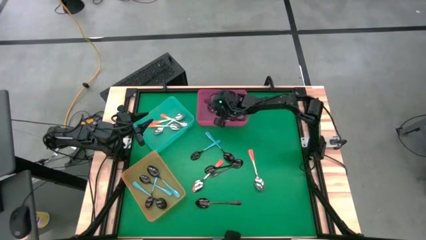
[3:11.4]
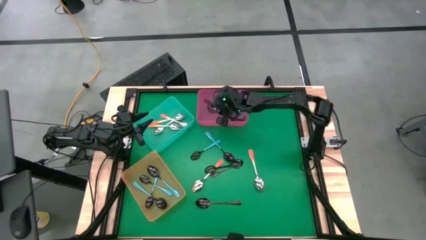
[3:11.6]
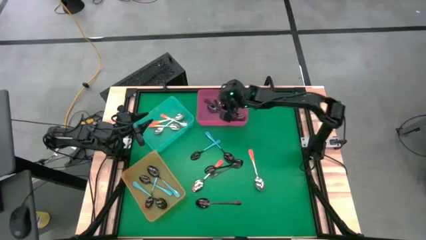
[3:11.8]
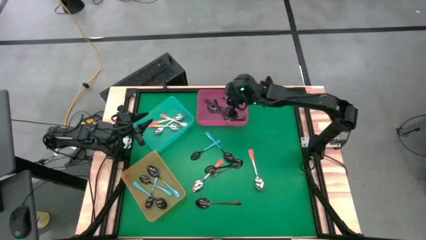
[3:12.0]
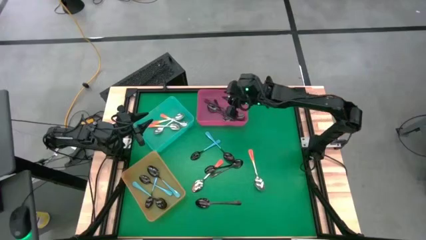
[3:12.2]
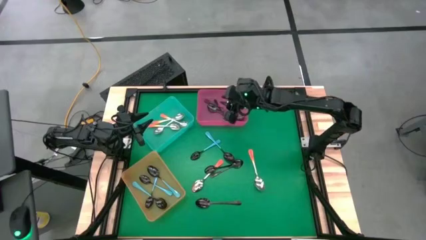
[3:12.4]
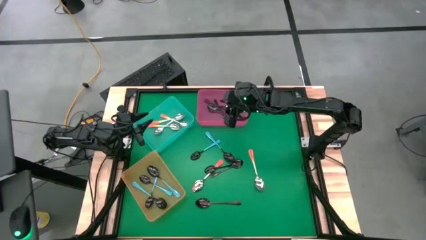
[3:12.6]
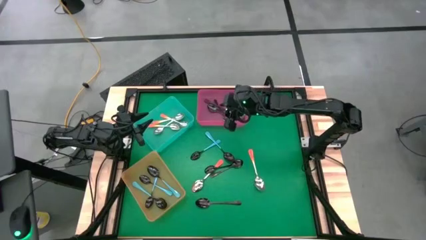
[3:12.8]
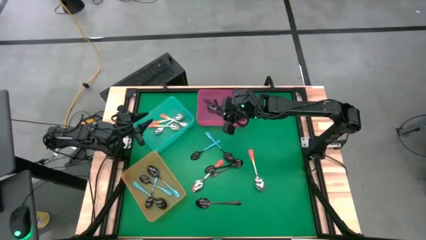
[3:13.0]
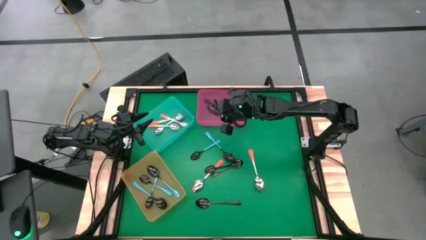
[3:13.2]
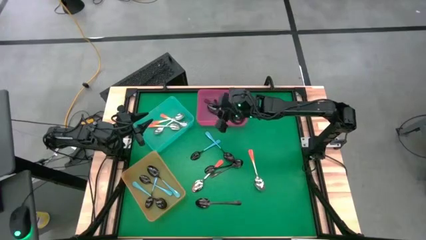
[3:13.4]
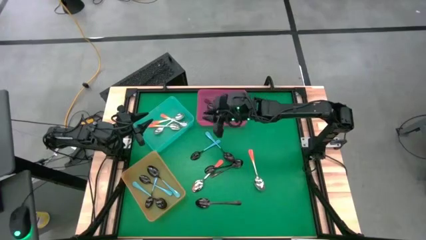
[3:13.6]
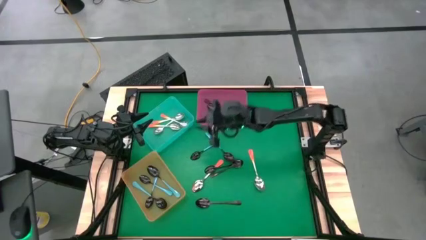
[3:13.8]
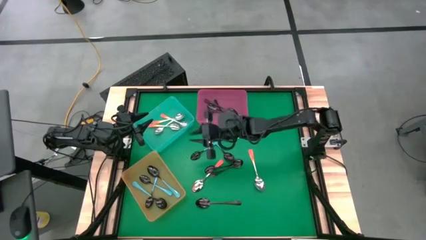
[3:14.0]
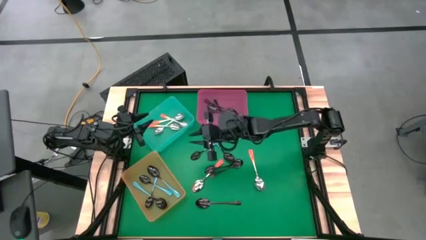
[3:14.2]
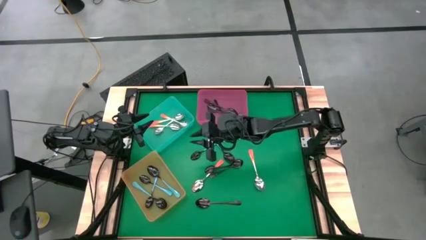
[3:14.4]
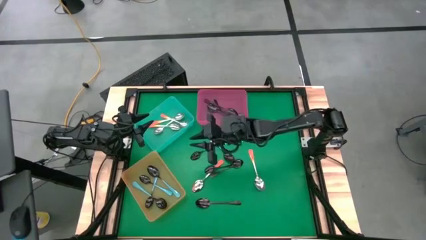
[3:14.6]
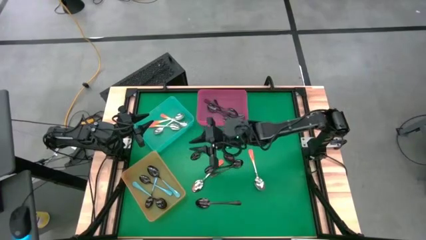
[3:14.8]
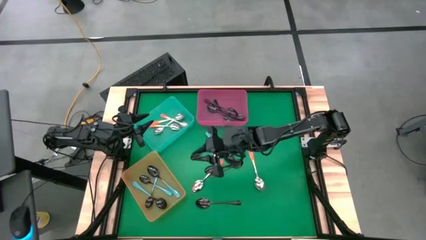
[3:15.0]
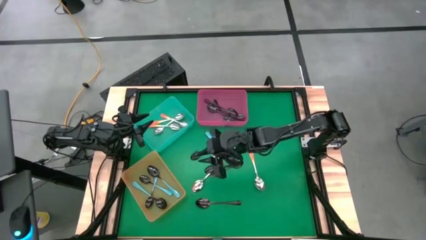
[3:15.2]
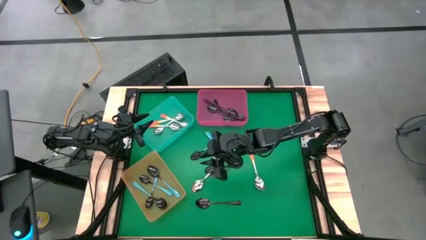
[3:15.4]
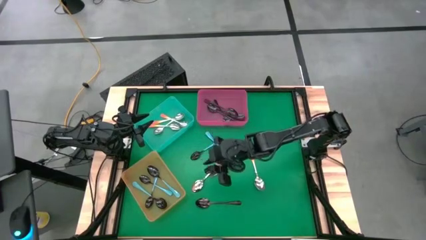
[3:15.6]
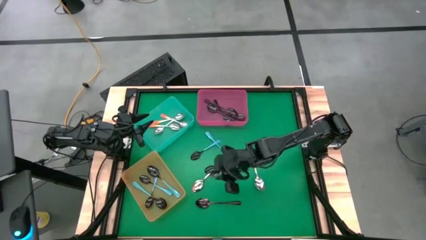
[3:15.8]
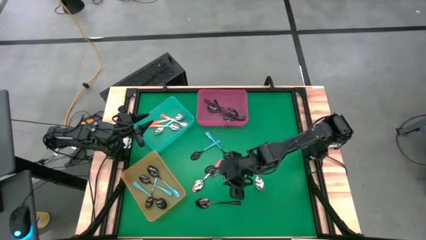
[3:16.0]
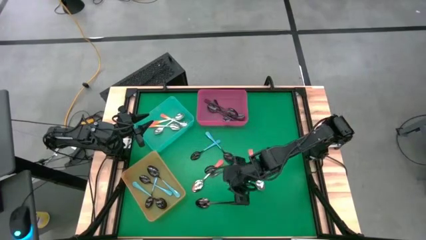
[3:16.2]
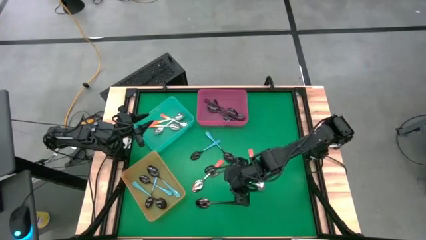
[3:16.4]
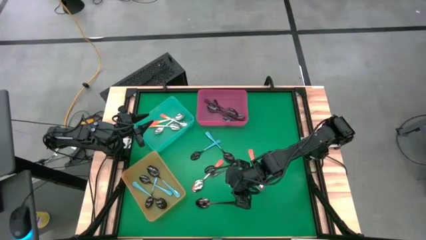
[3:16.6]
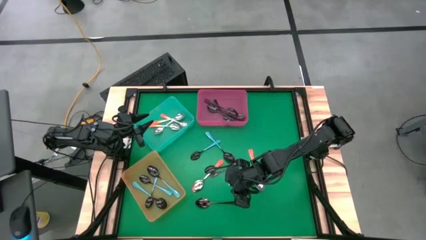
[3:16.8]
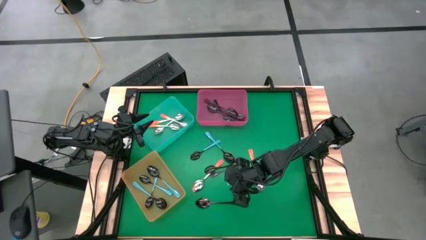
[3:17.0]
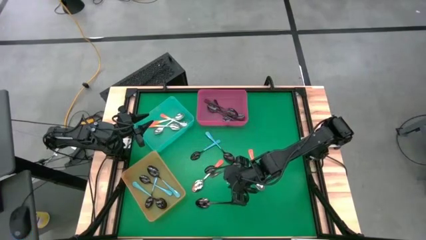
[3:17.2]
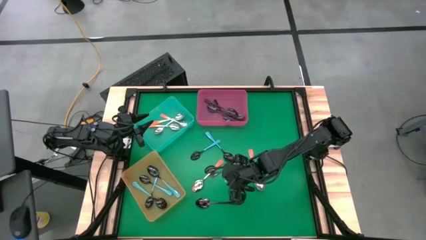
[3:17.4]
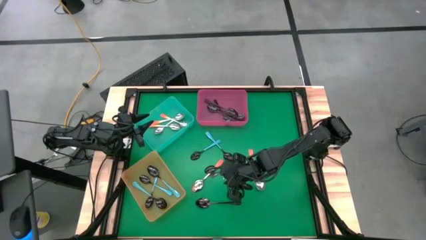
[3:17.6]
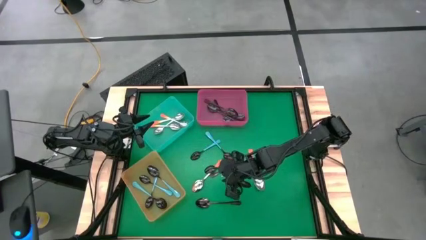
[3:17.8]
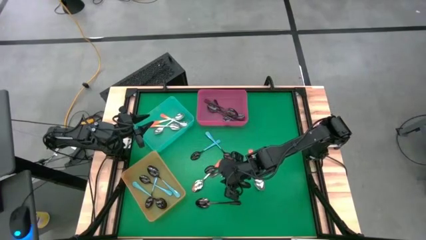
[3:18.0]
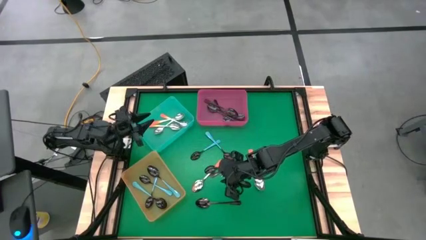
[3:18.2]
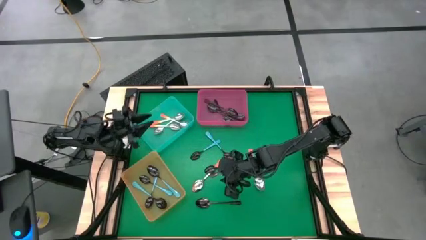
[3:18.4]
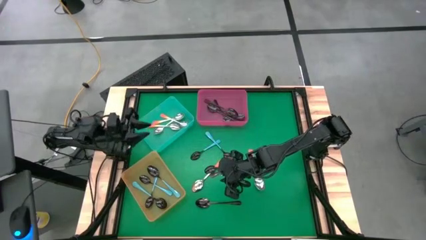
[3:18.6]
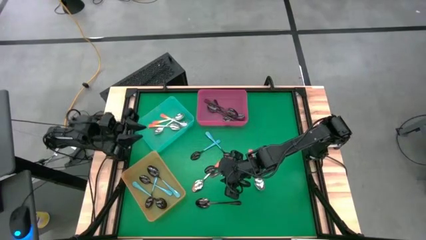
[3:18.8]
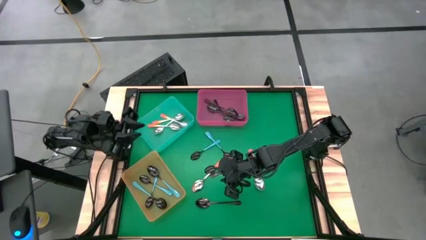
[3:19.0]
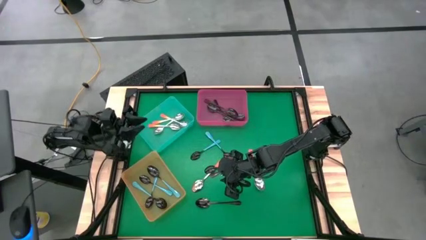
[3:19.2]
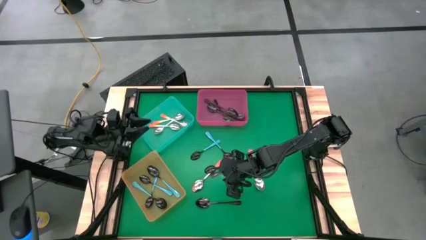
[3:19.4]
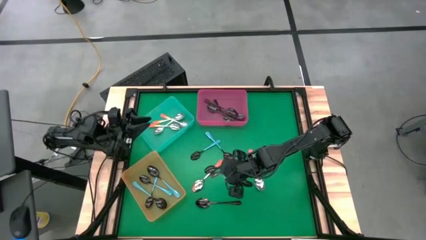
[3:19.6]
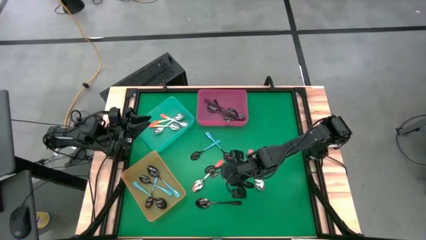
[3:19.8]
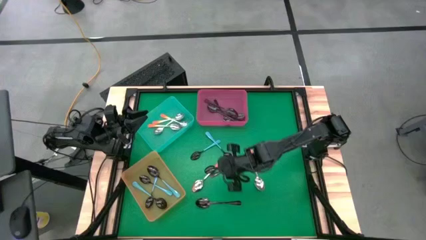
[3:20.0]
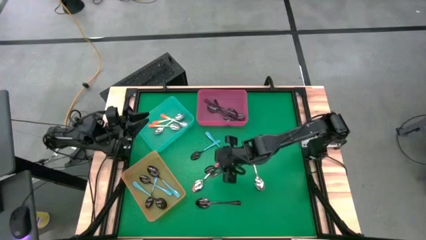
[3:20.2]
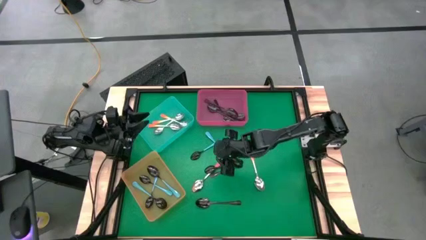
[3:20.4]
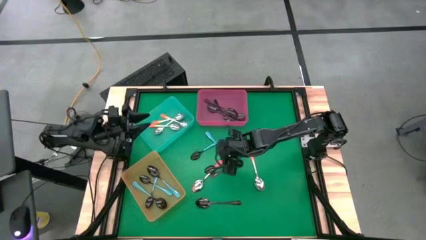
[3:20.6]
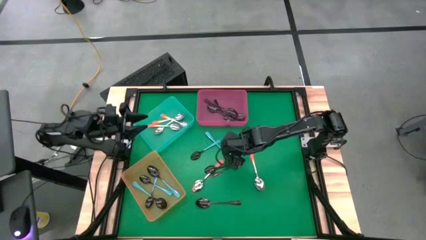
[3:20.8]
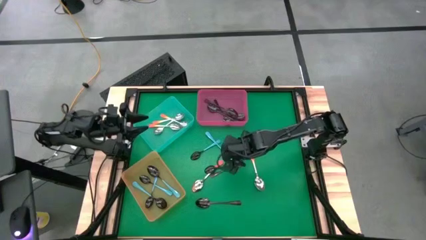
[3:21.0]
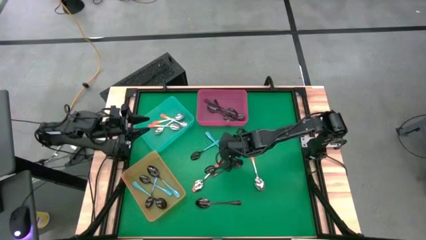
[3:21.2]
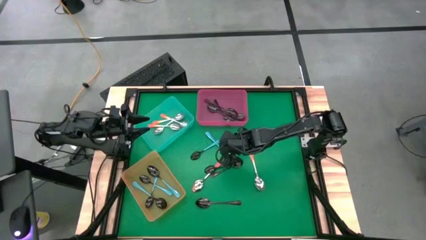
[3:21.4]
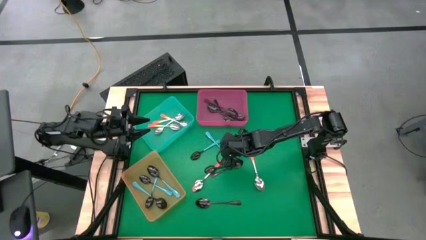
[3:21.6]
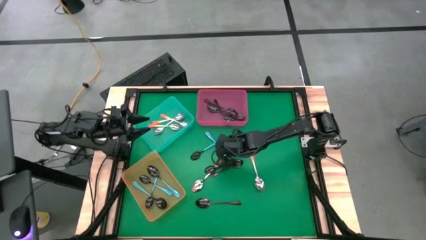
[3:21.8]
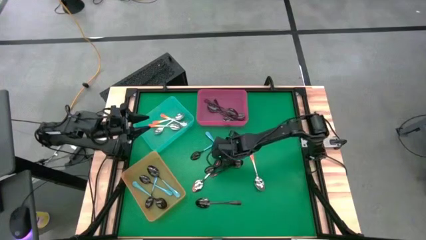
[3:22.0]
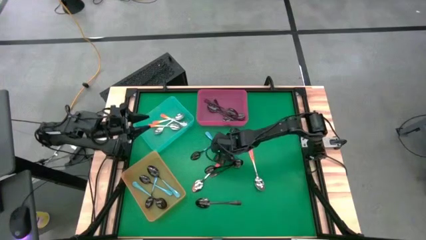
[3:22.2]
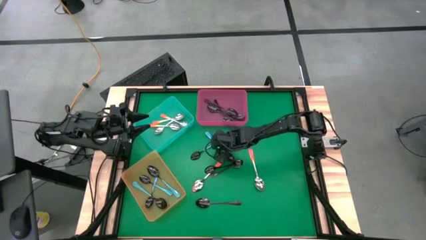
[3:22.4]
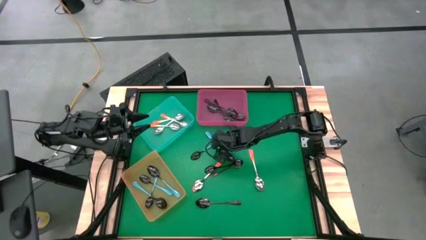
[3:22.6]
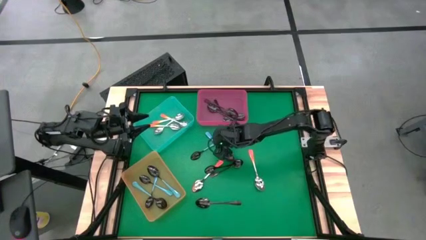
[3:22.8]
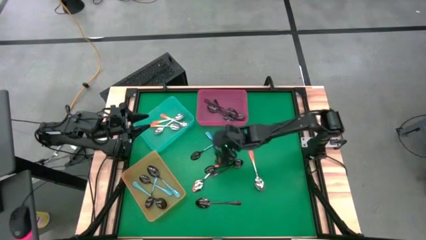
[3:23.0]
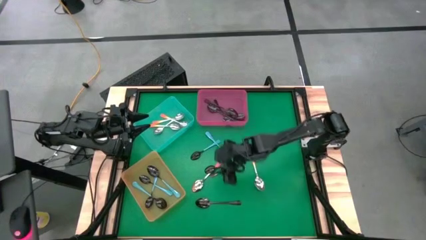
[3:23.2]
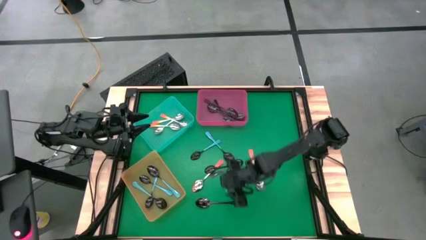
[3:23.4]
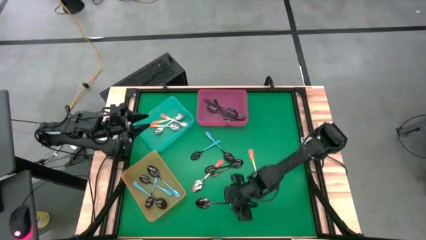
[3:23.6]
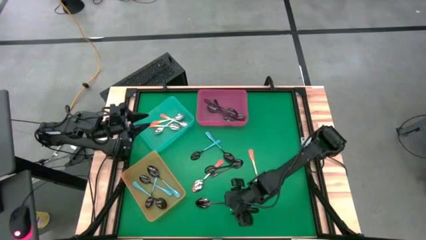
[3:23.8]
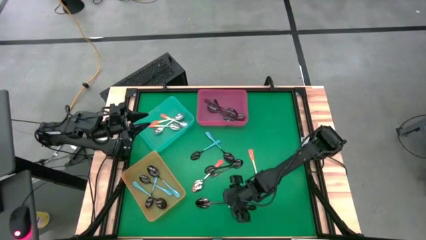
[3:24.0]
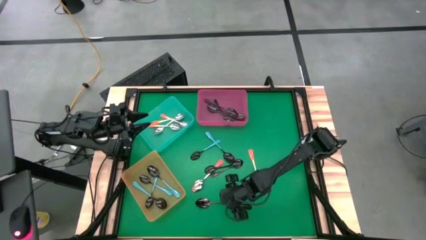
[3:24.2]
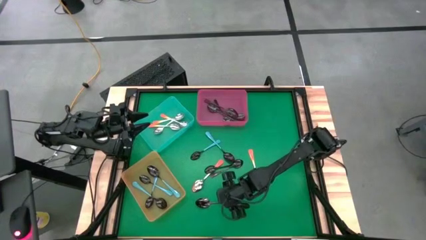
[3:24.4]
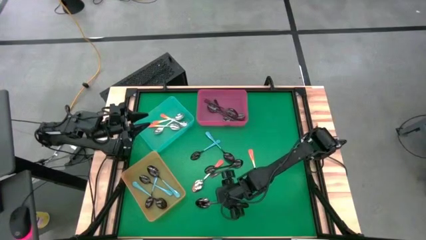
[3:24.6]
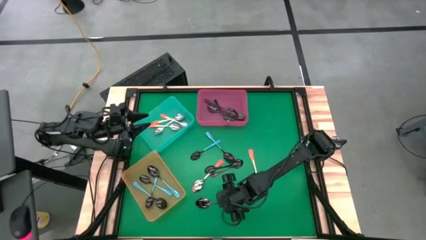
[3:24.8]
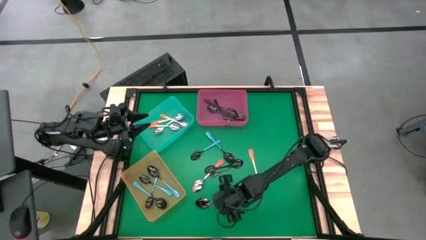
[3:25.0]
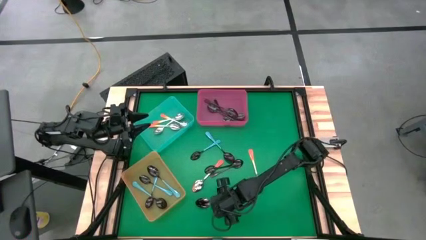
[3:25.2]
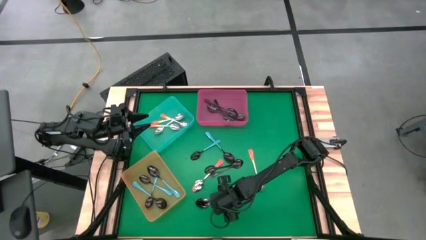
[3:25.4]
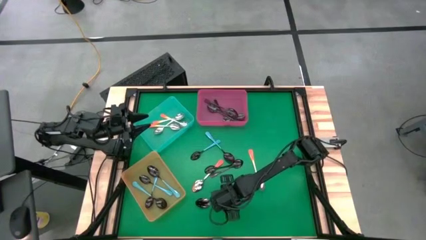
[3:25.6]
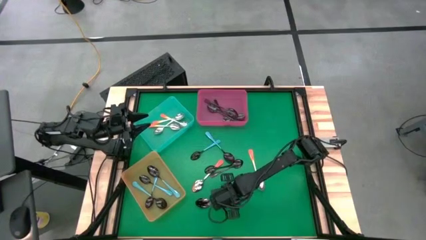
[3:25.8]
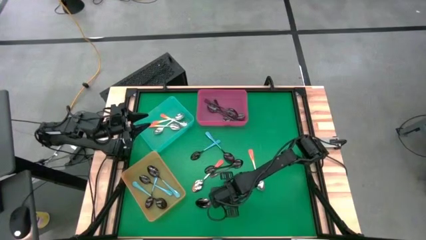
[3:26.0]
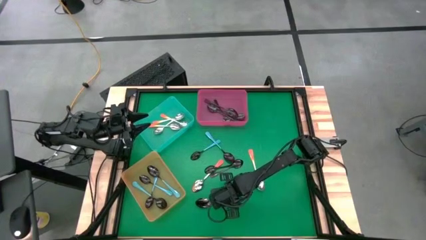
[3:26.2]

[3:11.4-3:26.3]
Task: Sort silverware by color (type)
Put the black spoon into the pink bin

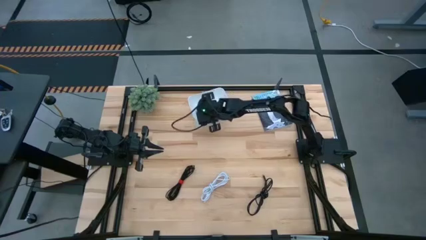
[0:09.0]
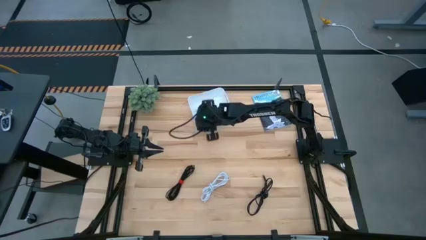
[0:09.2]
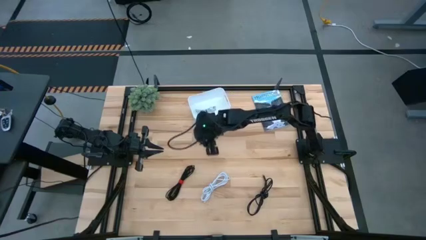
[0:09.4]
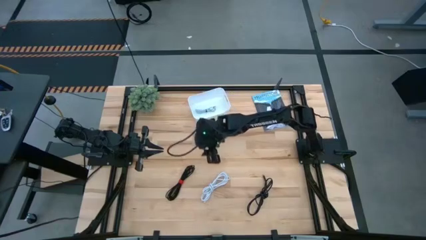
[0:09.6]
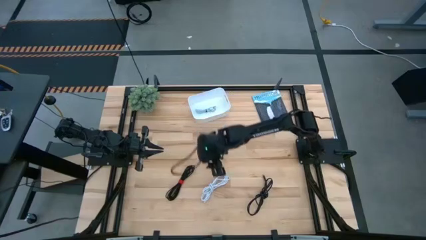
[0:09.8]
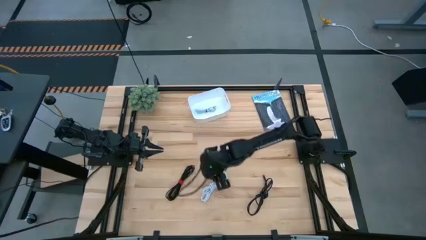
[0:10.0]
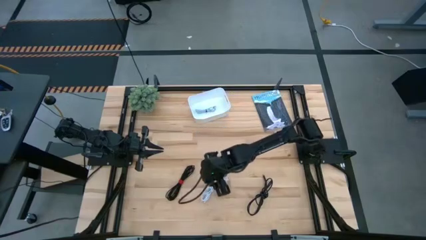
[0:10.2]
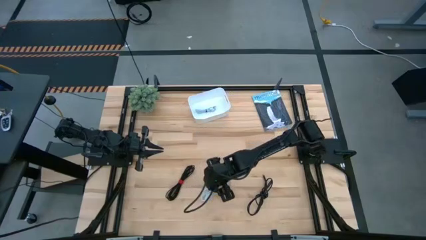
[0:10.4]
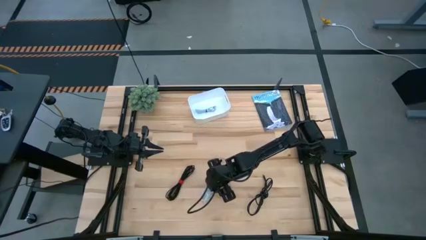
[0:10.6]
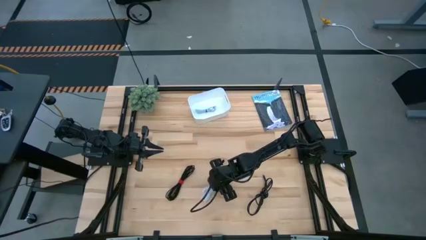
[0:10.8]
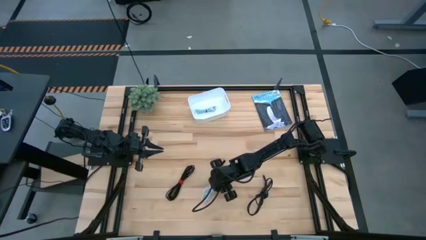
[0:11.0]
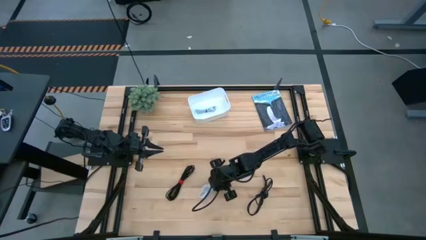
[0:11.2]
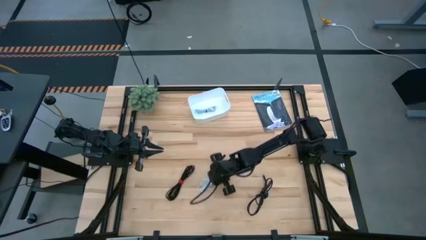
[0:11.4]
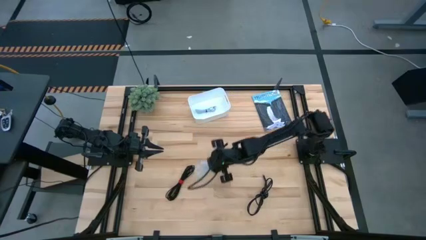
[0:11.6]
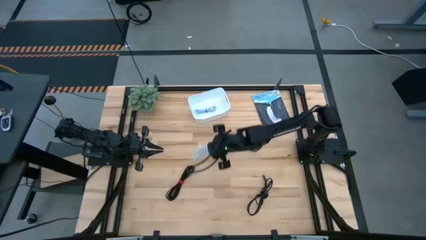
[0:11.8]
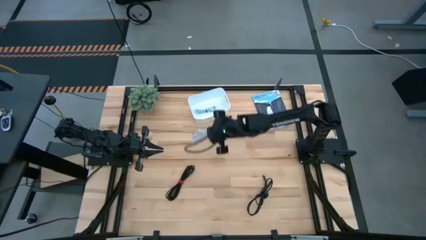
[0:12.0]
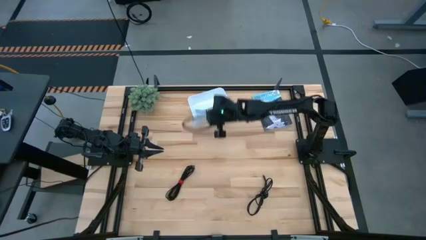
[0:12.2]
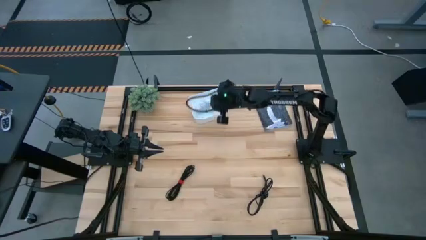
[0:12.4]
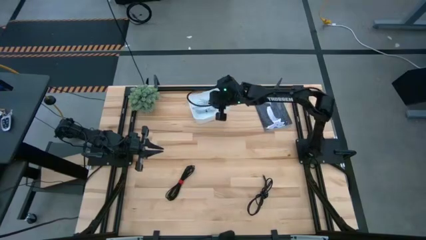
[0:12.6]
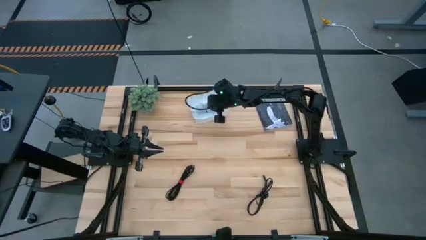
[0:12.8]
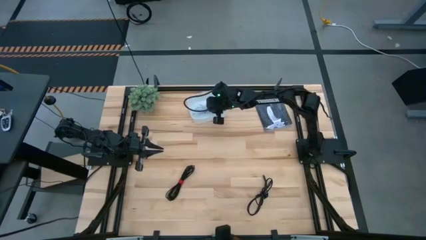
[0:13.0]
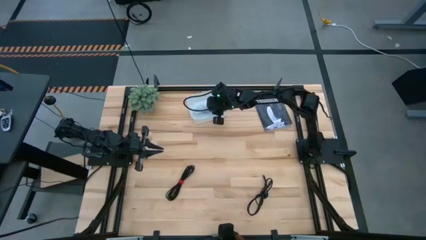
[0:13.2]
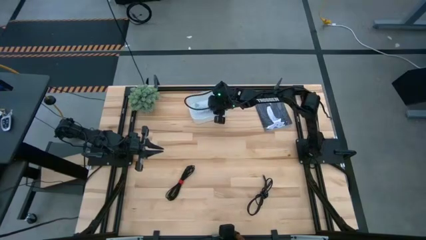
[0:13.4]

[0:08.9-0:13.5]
Task: Pick and place USB-C Cables
Put the white charger cable into the white bin
